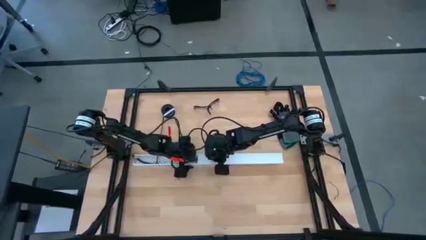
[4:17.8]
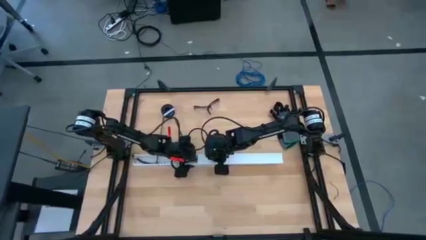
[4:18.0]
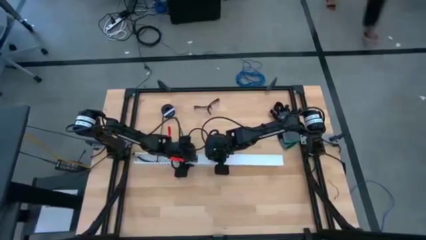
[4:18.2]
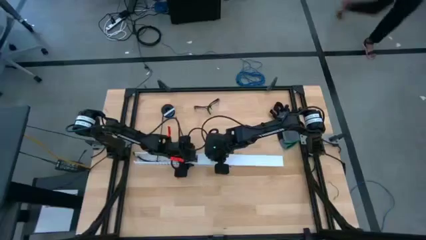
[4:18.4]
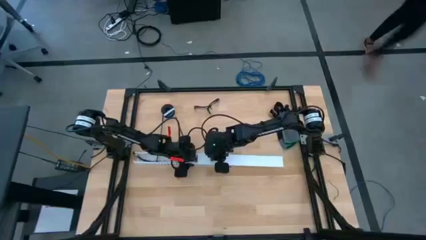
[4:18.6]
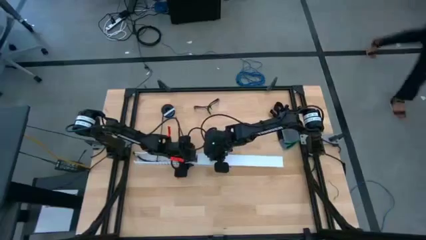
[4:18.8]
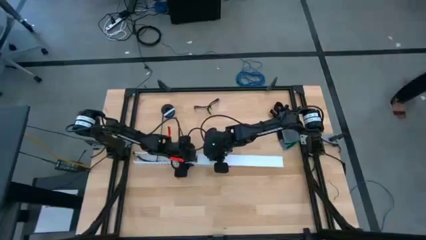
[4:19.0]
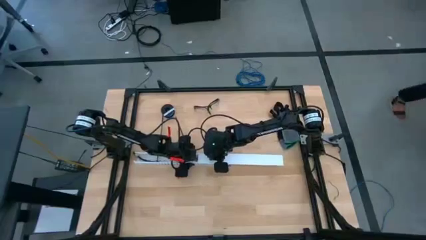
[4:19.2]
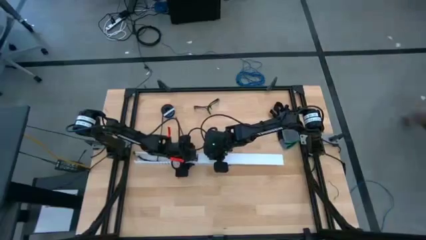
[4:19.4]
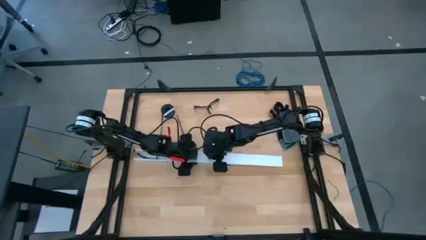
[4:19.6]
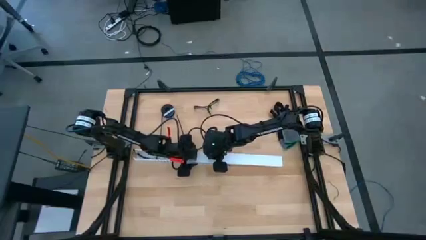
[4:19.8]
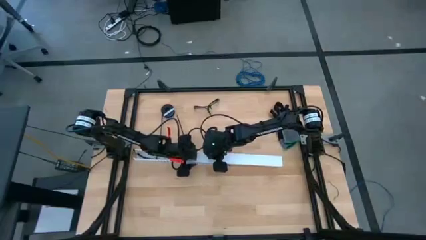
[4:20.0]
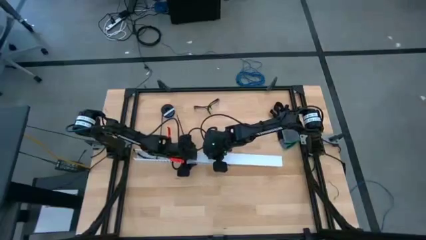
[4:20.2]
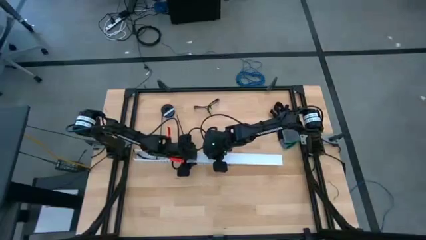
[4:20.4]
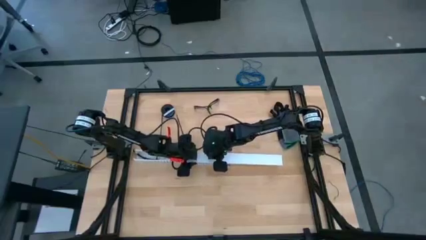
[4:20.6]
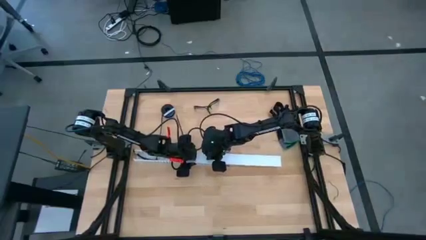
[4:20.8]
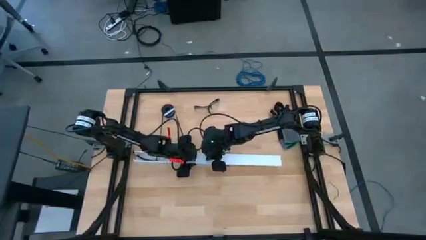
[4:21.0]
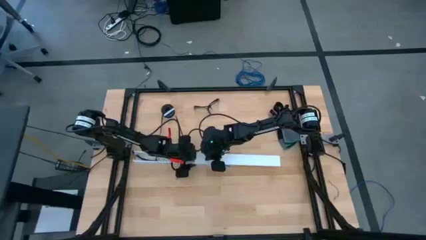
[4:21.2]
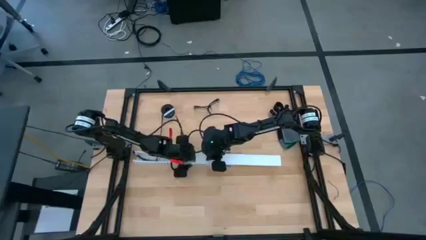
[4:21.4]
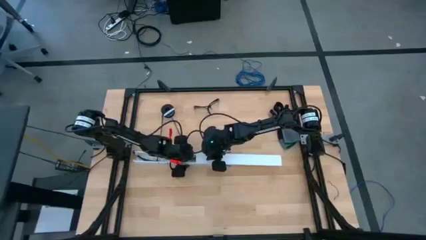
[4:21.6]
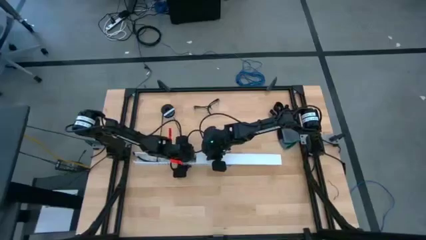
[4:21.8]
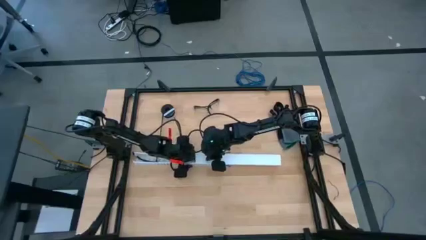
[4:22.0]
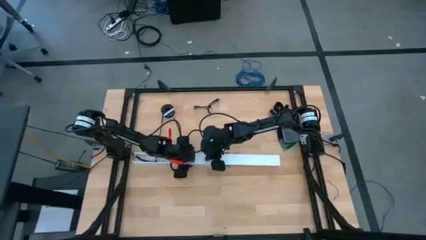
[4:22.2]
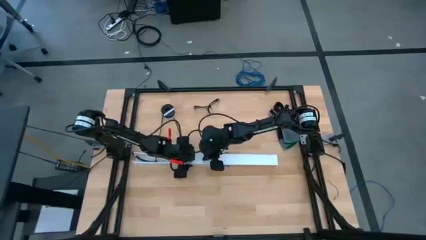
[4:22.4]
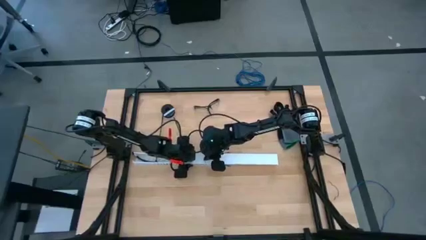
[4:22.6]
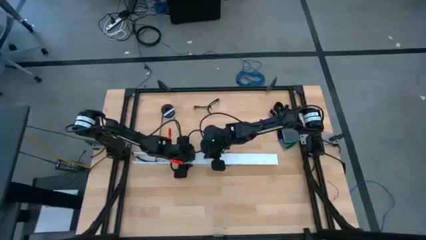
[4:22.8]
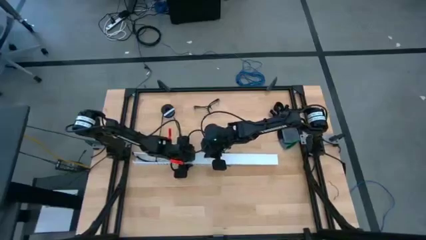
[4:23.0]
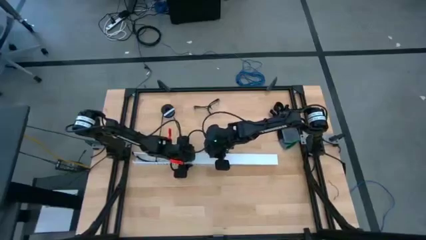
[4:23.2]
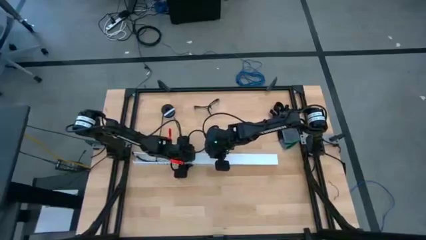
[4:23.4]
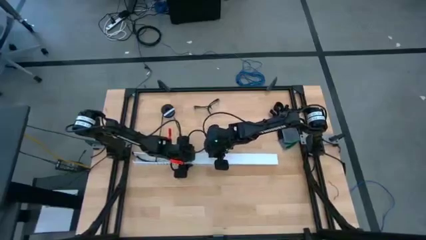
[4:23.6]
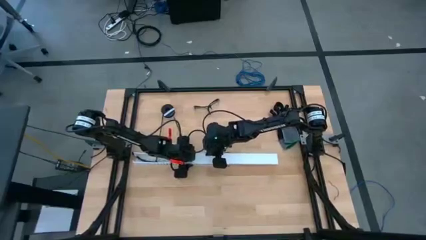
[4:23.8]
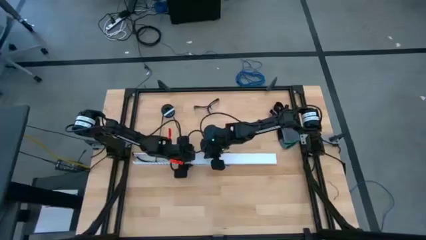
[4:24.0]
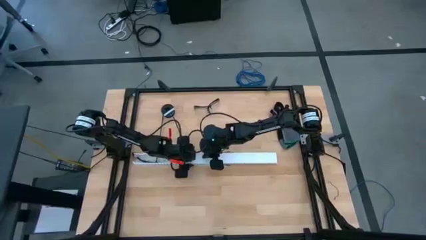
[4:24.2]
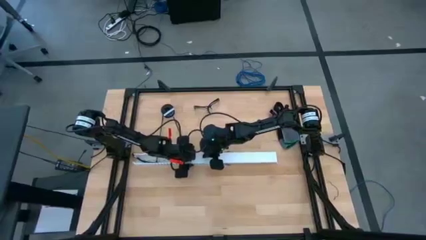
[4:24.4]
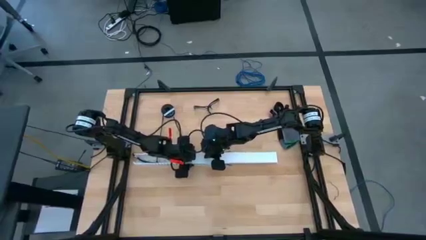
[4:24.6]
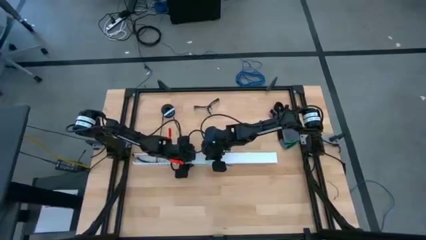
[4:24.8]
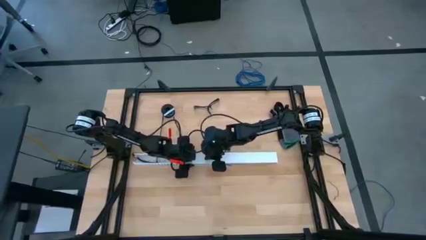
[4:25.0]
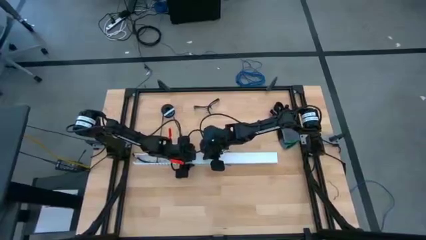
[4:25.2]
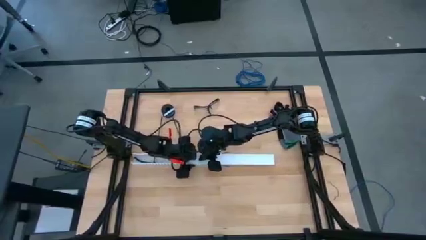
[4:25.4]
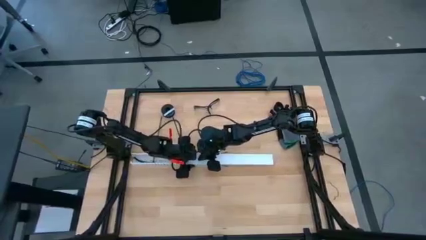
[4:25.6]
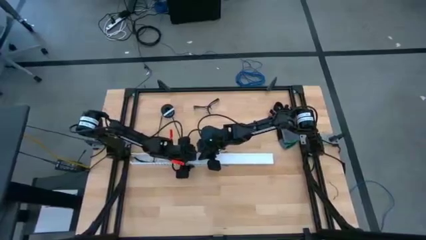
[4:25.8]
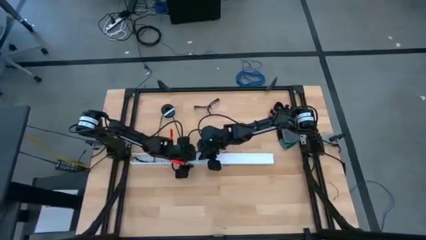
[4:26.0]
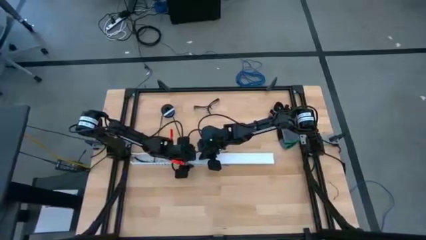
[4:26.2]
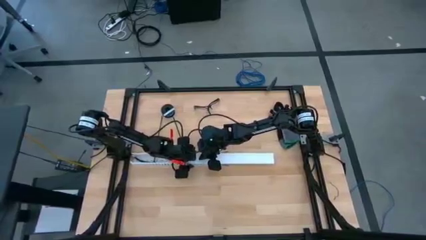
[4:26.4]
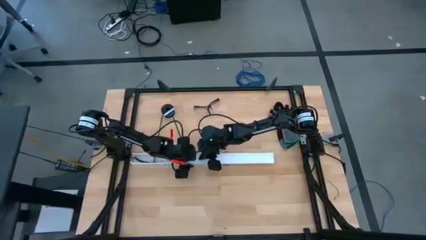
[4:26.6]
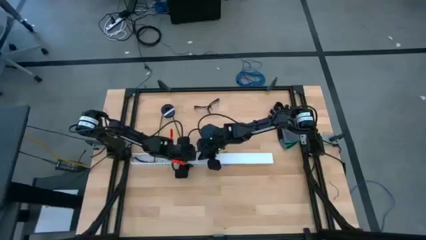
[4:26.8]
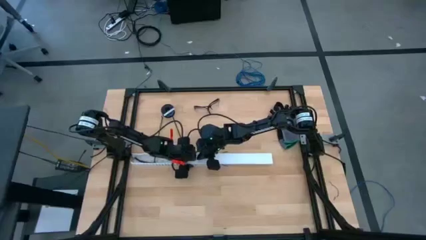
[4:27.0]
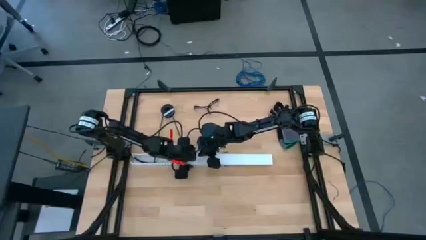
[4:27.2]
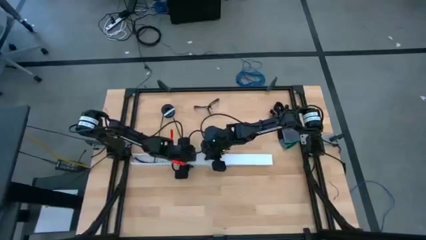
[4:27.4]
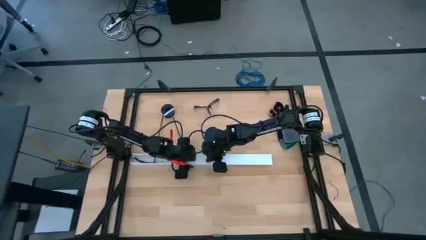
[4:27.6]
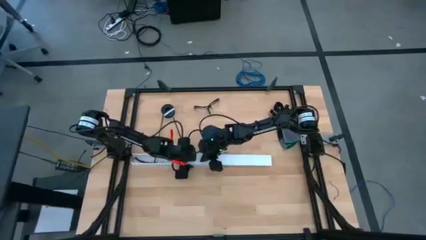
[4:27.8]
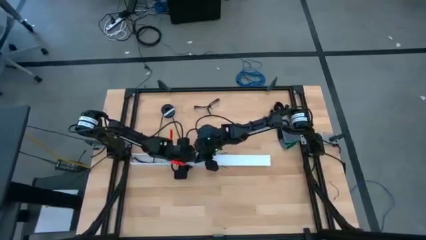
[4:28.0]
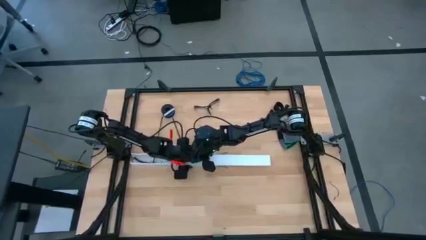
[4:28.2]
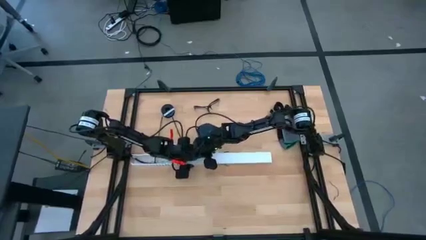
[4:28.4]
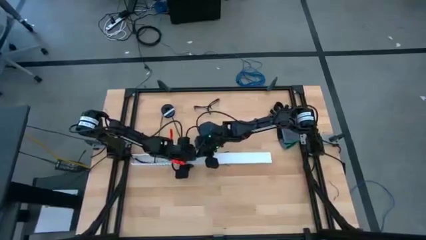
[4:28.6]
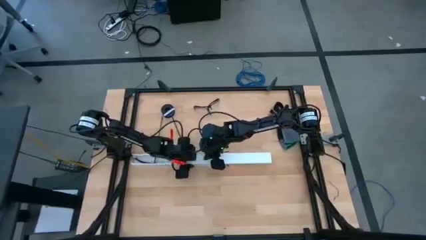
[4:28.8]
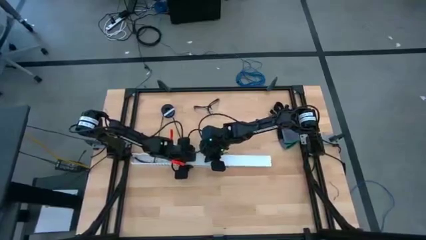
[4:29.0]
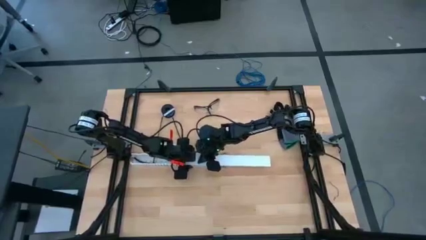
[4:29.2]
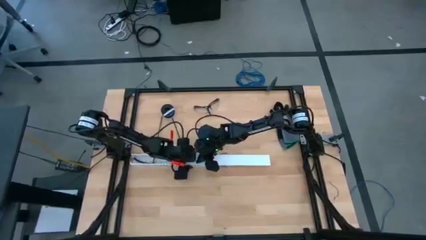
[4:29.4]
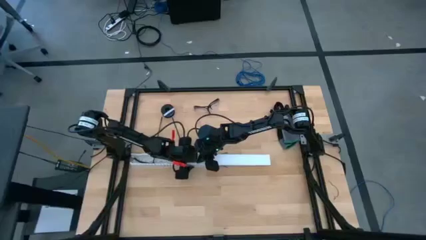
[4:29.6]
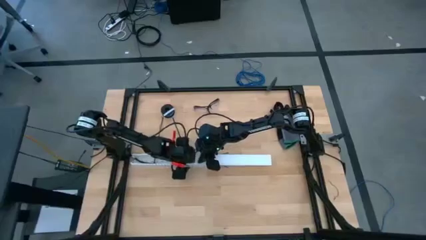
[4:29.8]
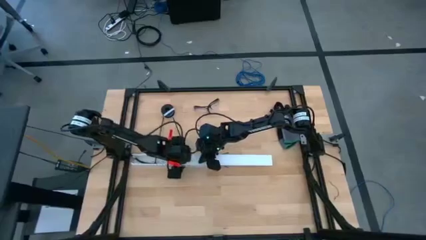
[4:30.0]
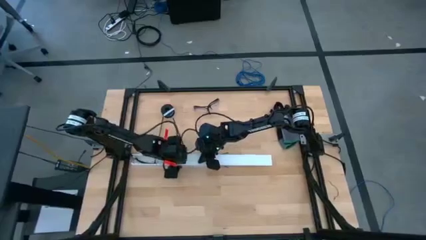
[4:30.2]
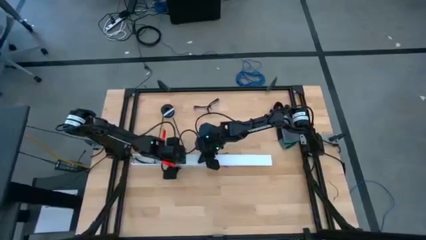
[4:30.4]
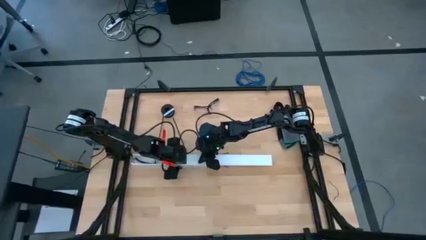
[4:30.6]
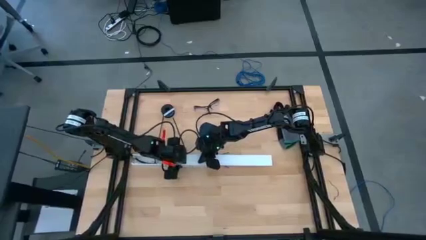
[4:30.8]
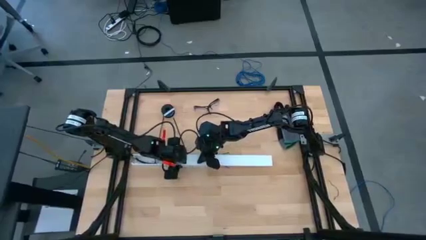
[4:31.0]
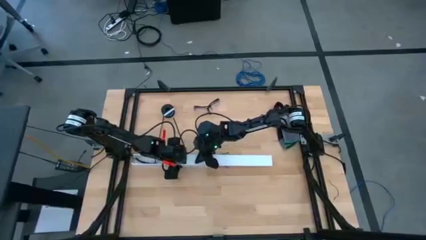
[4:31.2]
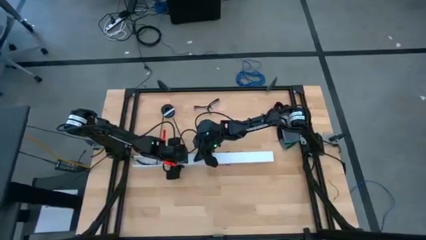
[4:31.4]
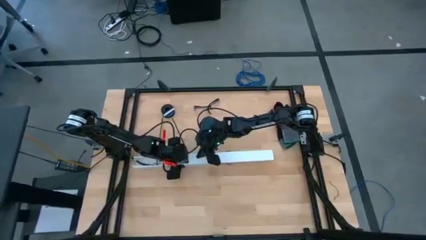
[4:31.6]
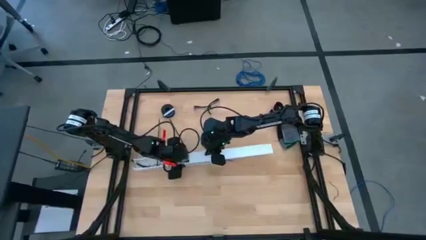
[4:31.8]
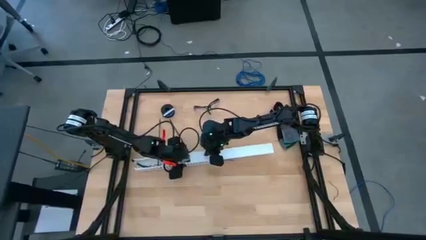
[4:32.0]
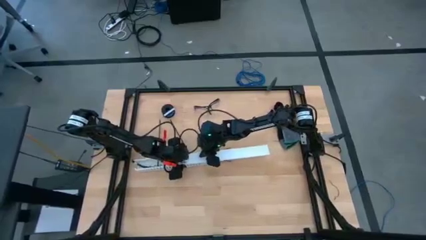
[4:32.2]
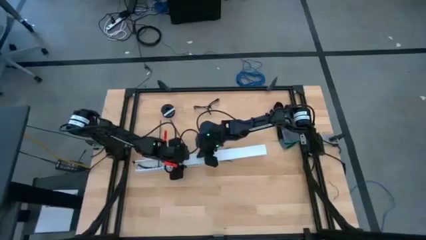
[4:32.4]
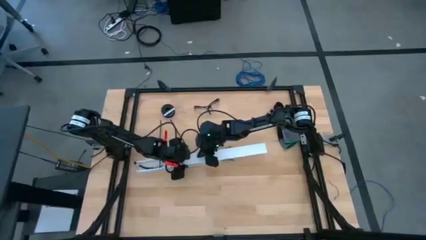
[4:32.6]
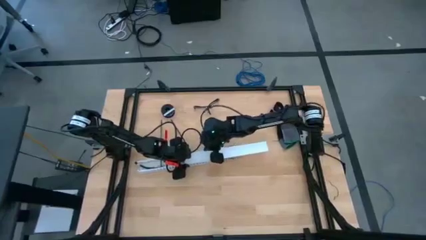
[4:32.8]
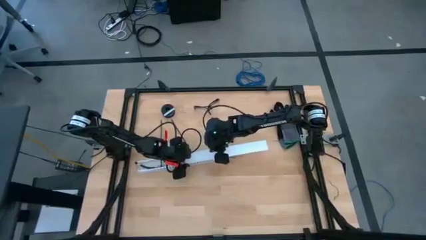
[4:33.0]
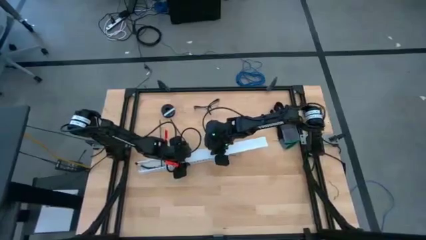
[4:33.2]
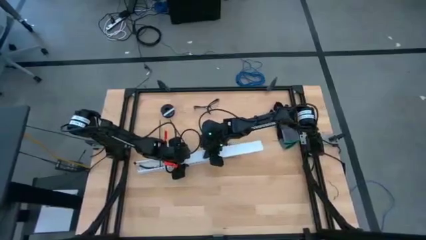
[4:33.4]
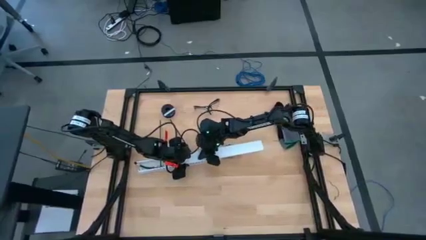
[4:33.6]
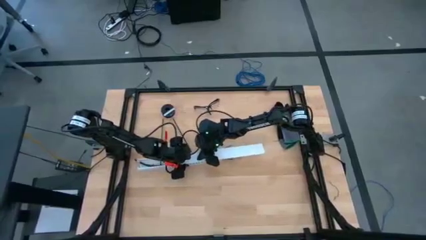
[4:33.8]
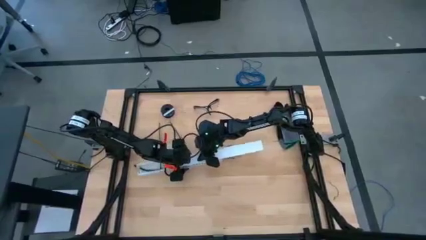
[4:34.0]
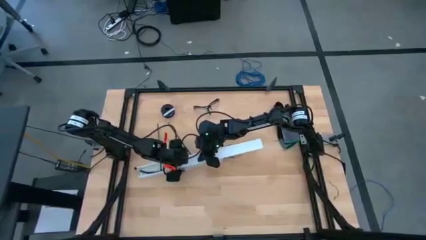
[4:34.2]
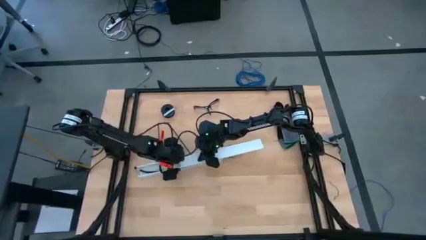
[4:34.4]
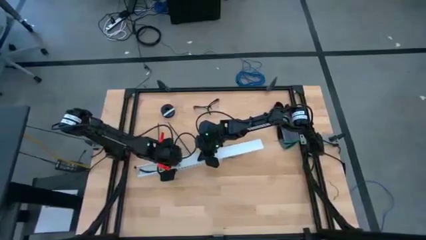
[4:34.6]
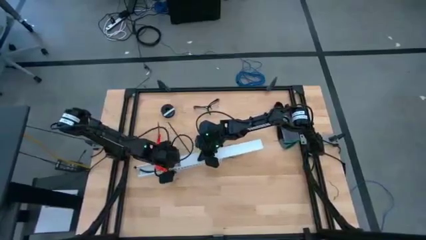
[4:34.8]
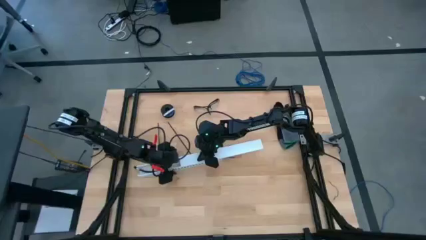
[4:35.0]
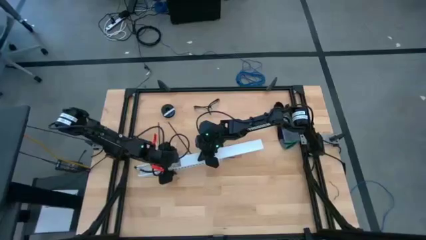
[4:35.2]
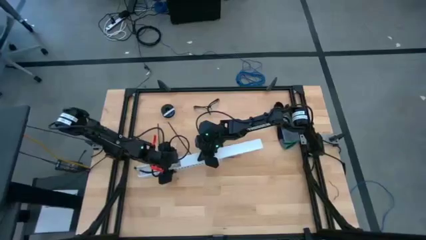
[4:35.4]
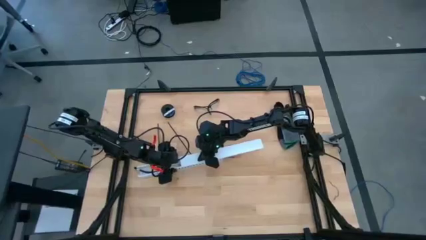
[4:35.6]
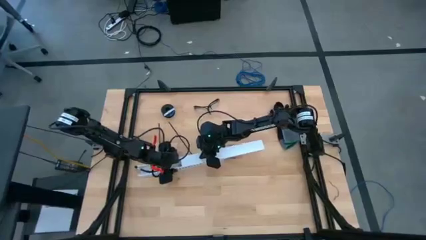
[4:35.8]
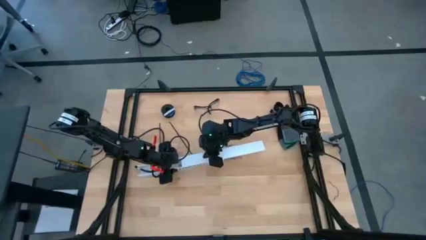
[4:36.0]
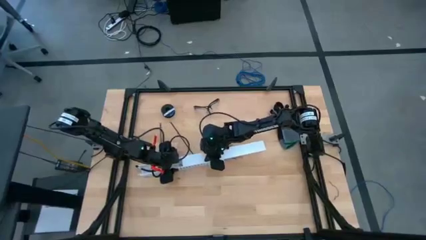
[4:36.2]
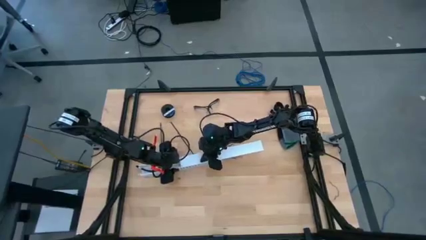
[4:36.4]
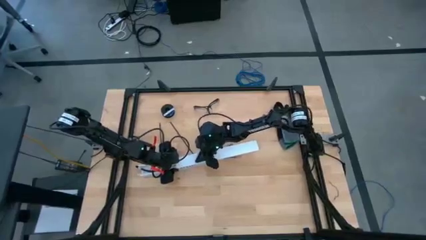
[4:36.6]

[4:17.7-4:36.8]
Task: Ziptie cables
Close the white cable duct
